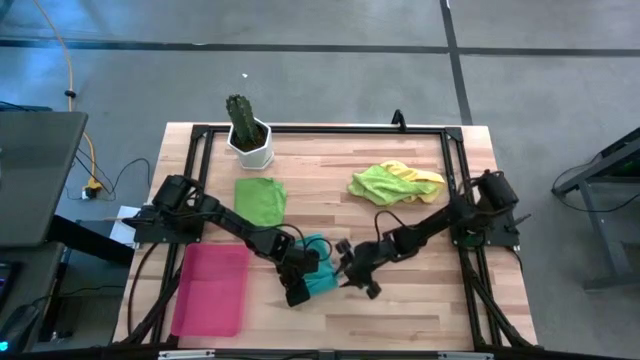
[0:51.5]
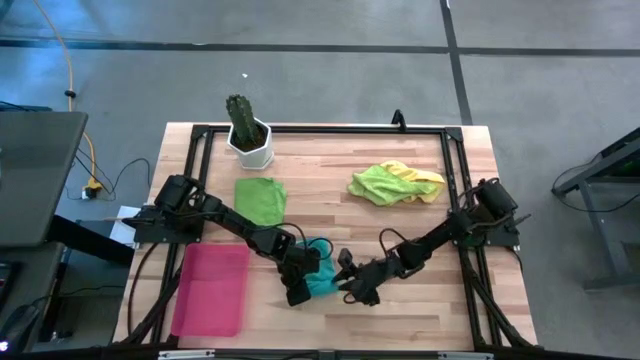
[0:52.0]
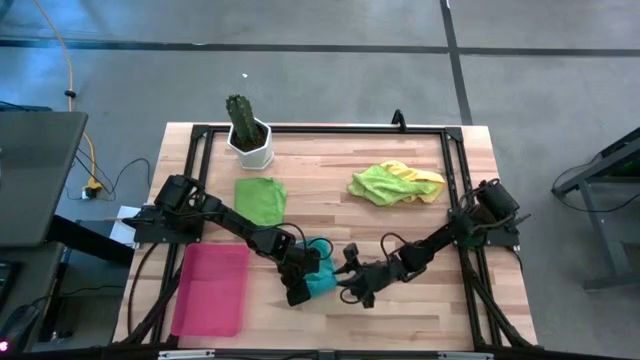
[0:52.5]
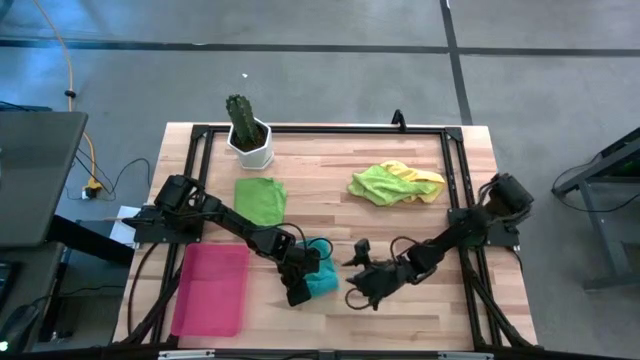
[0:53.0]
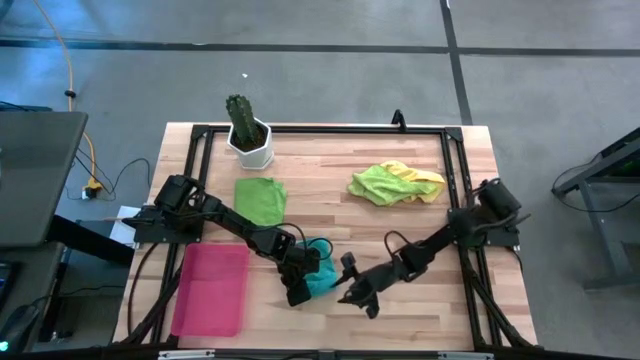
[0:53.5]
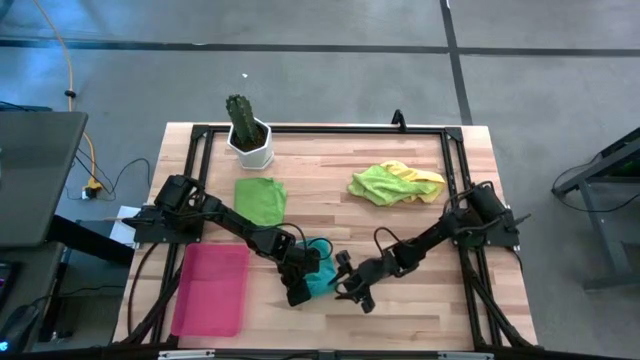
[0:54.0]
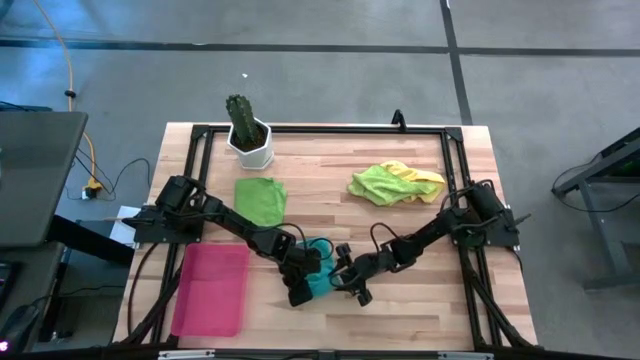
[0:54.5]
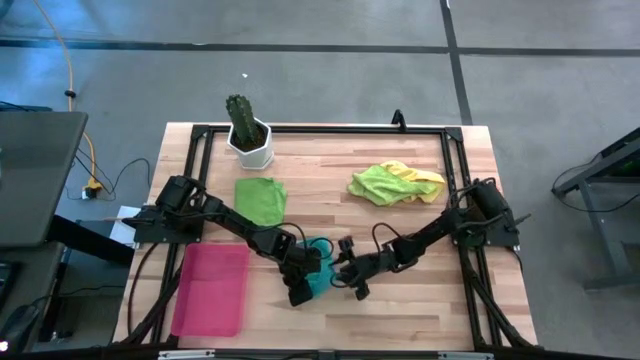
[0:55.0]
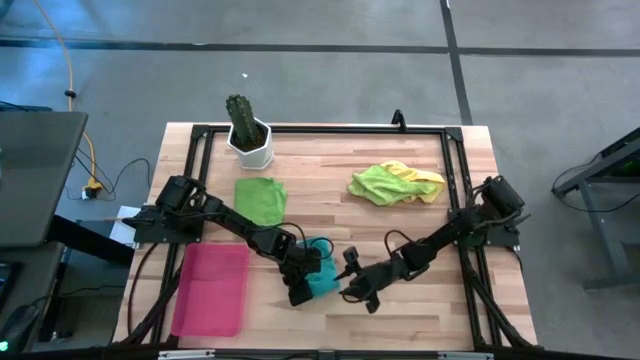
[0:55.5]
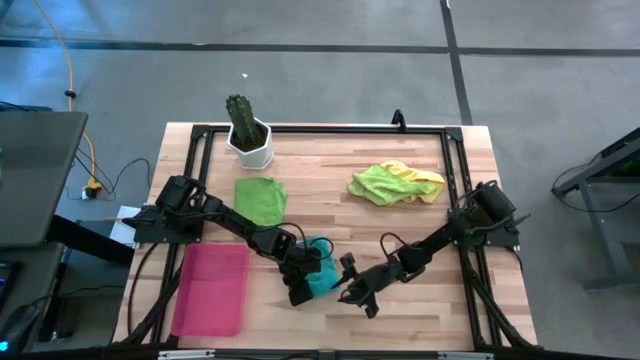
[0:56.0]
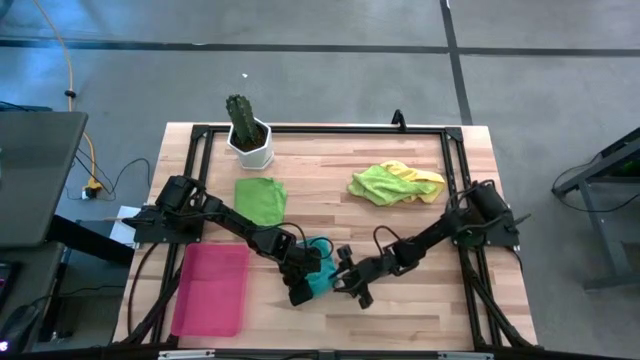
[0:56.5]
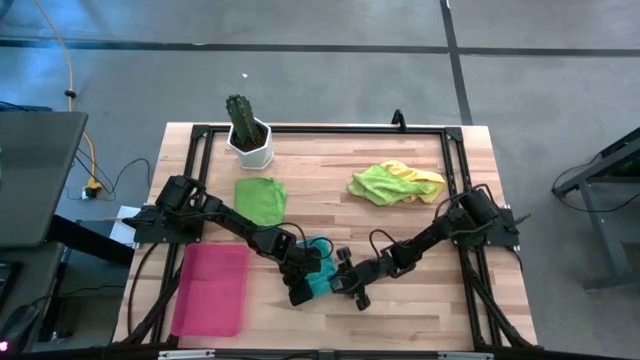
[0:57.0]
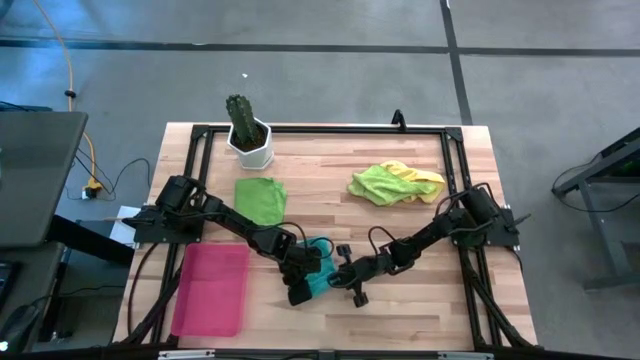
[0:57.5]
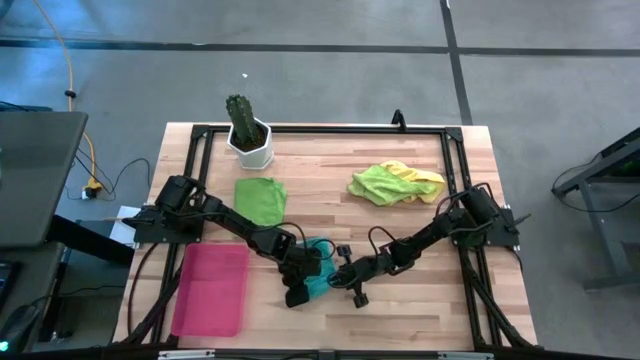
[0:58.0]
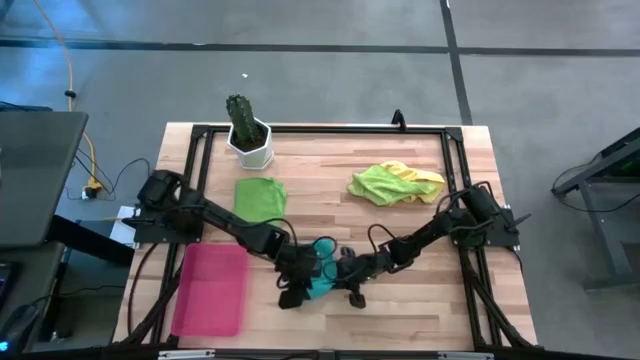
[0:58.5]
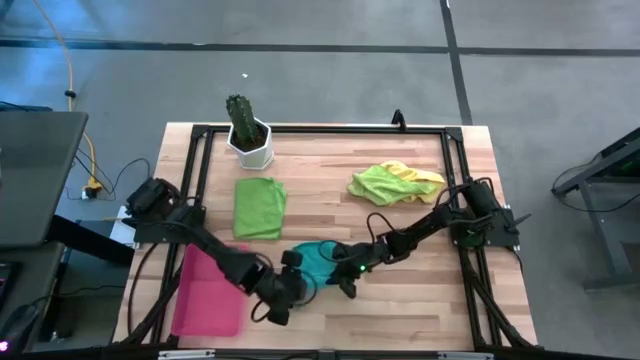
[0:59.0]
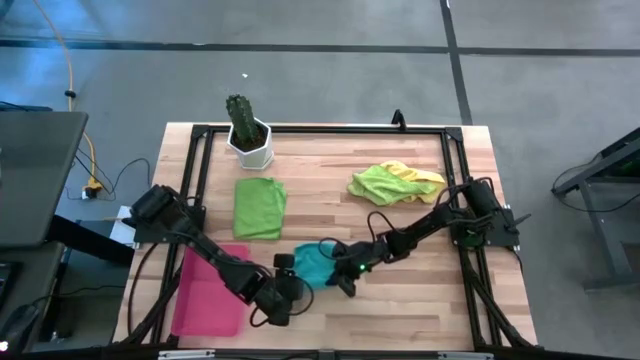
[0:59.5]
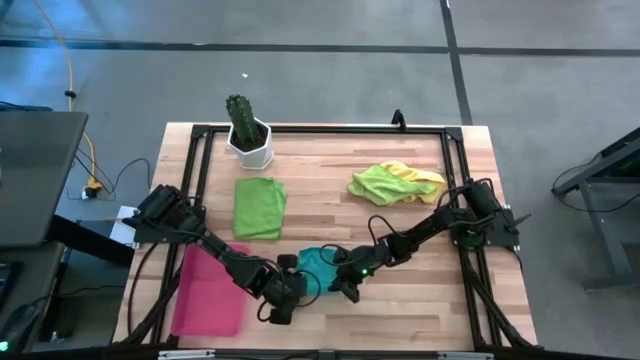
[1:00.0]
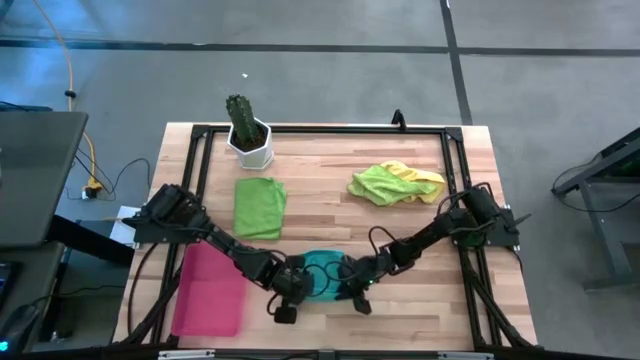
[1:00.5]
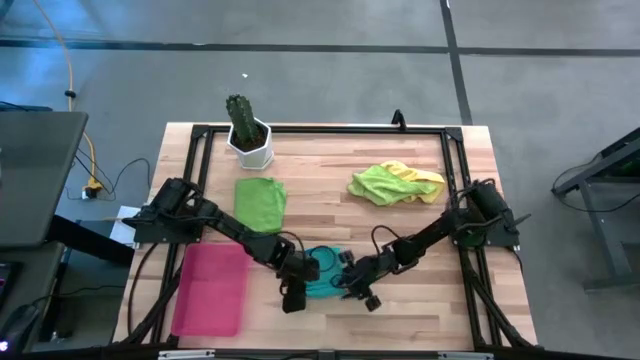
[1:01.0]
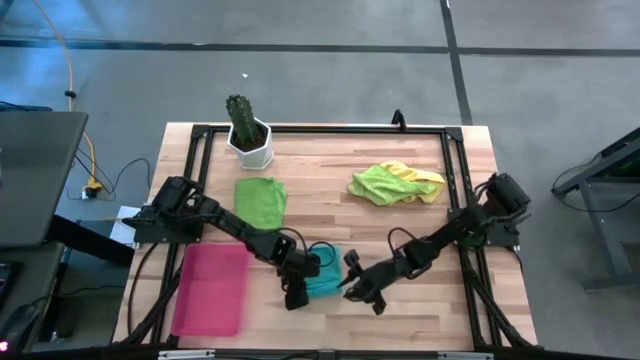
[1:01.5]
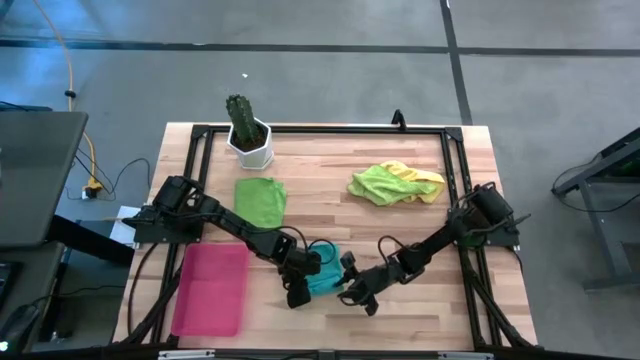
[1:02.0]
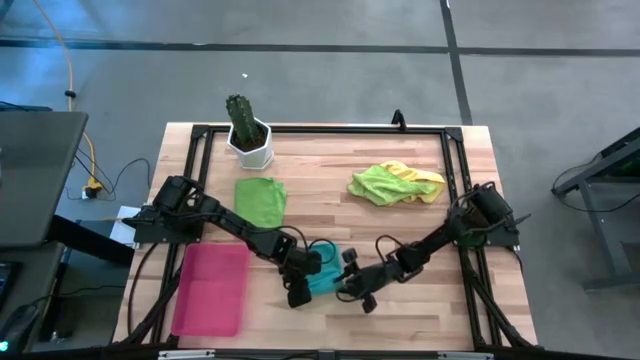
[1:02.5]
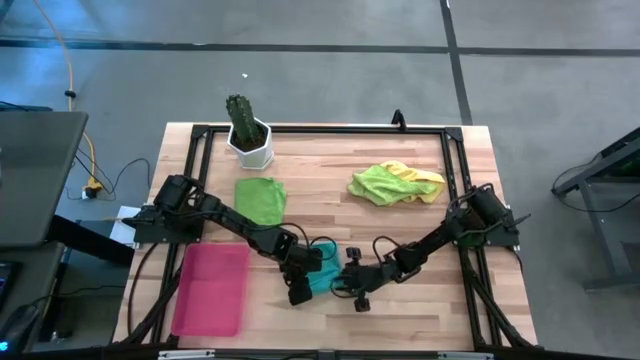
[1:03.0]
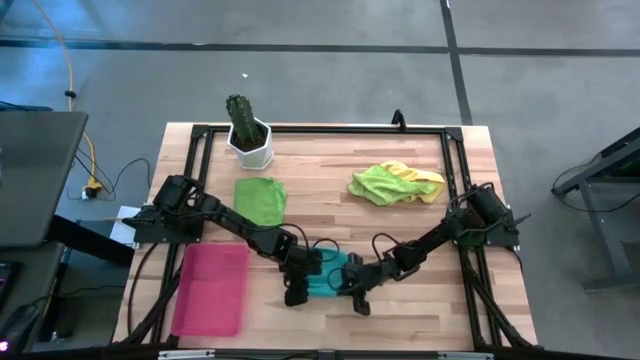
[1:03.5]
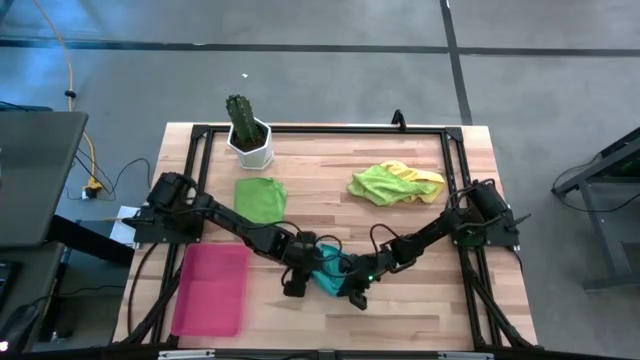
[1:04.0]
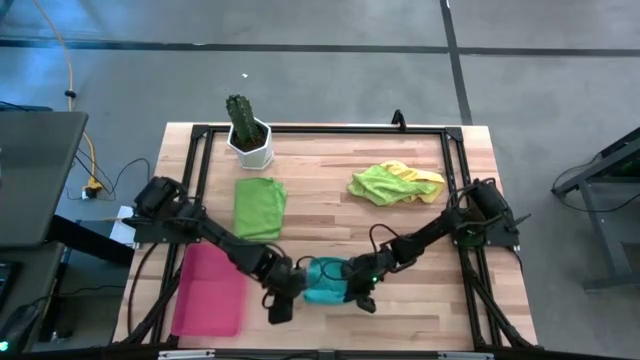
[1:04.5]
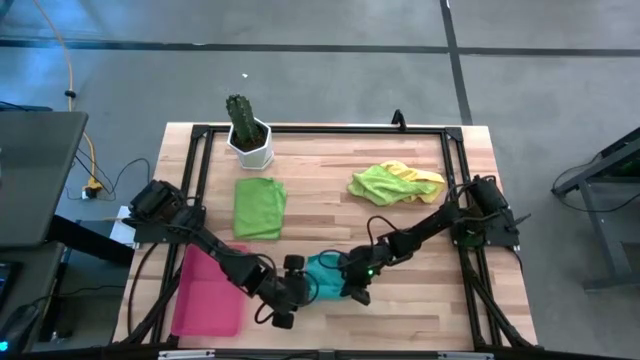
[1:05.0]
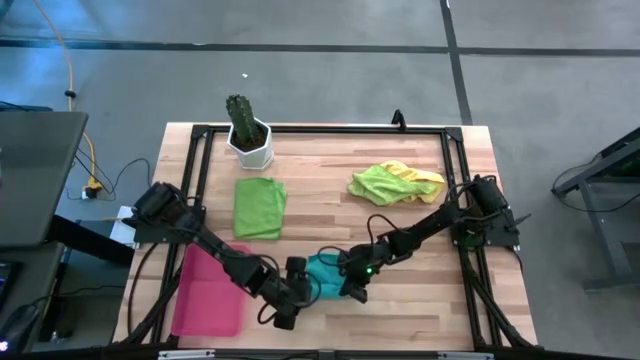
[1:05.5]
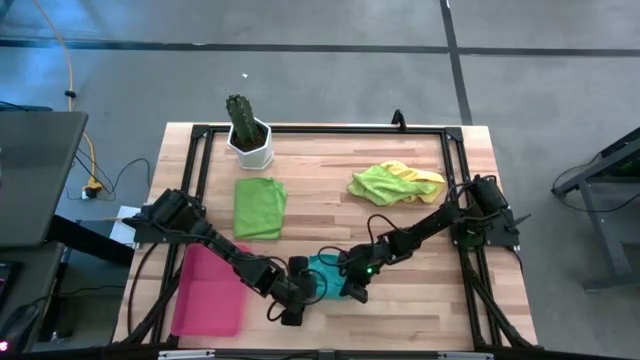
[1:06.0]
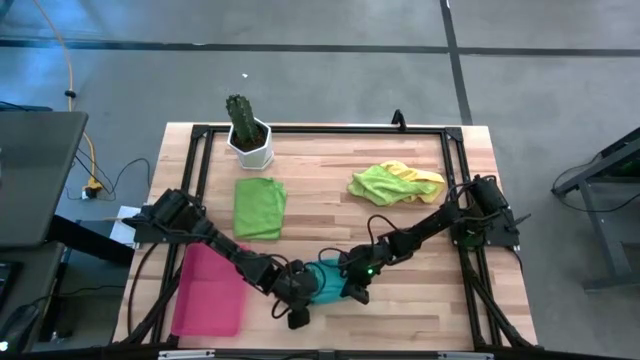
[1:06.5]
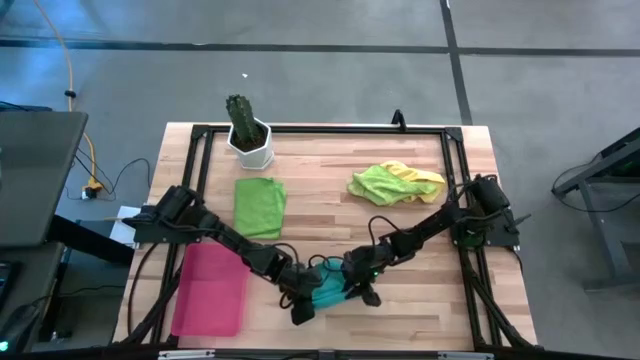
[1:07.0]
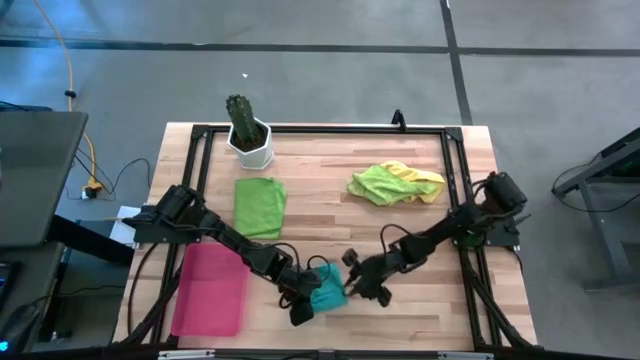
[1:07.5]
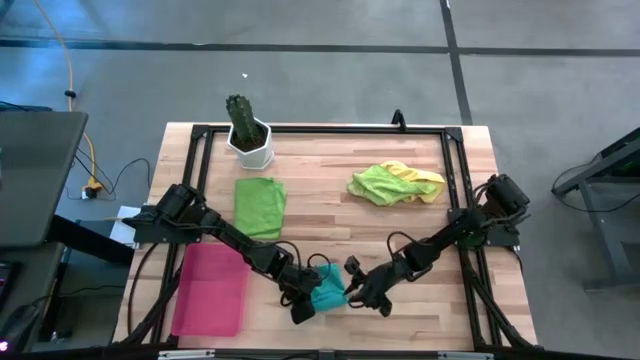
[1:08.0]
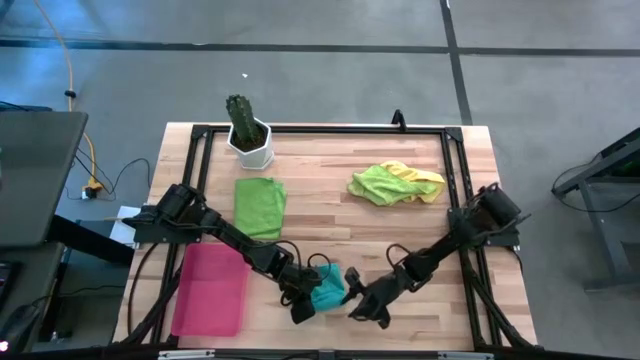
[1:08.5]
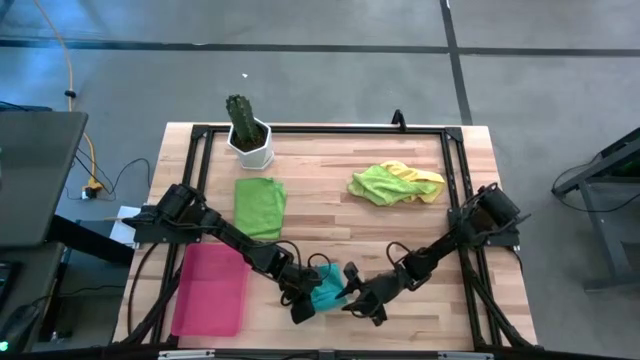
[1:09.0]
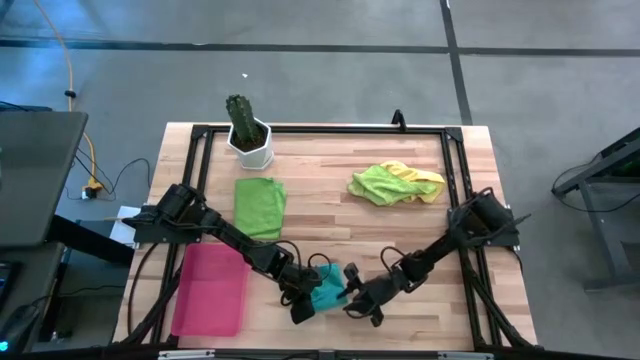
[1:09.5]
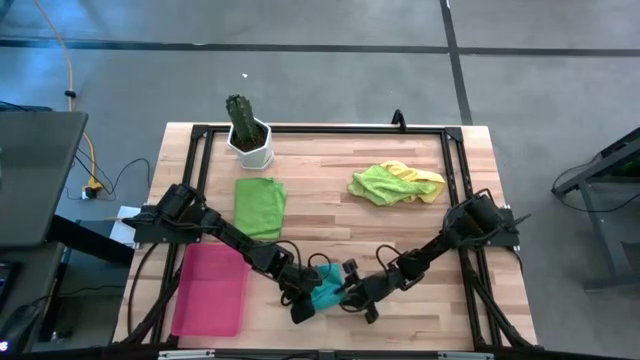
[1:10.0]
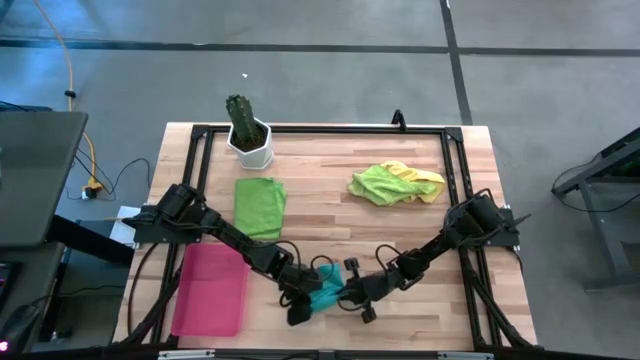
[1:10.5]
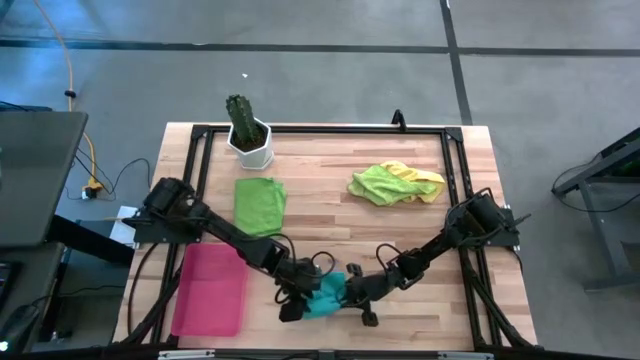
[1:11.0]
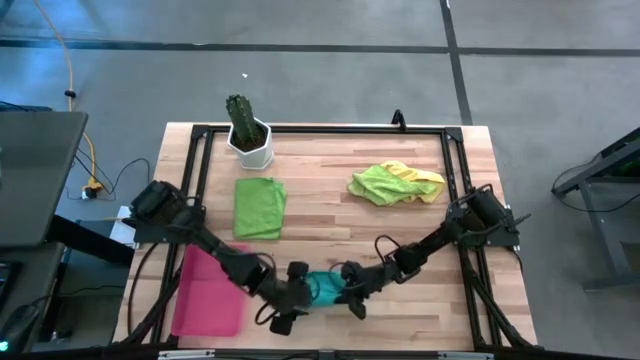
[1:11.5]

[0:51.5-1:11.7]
Task: Roll microfiber towels into tight, uniform cylinder then place into a basket
Roll the blue towel
